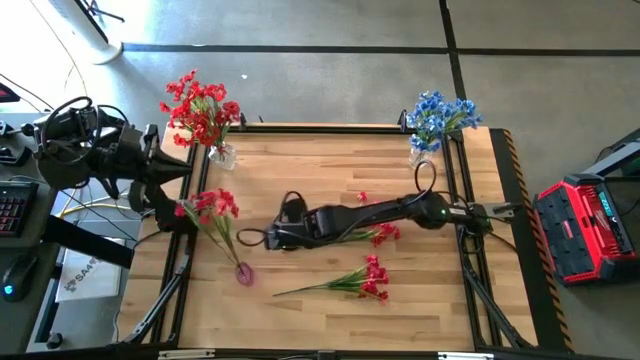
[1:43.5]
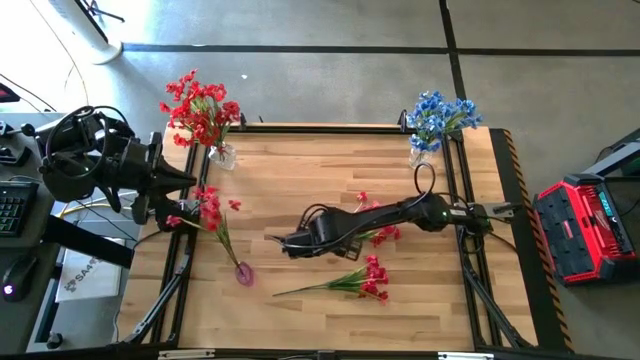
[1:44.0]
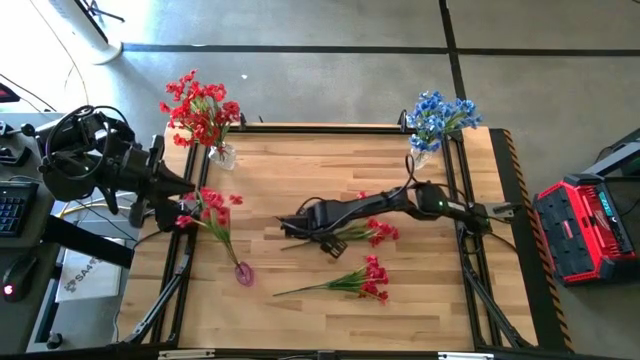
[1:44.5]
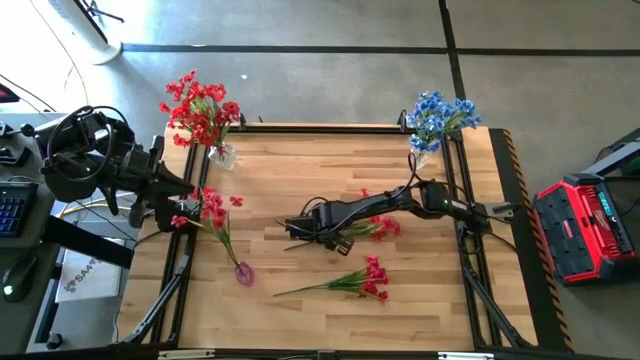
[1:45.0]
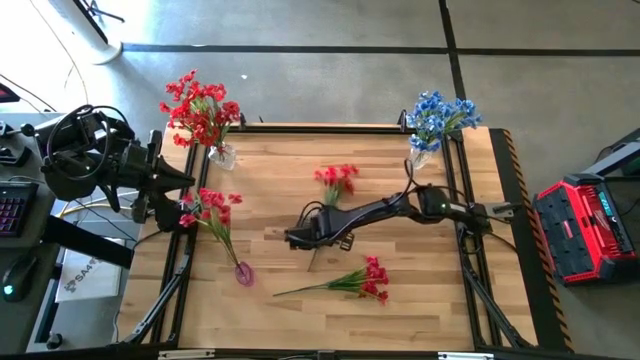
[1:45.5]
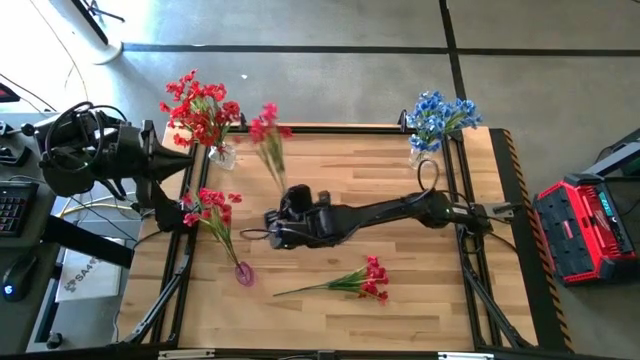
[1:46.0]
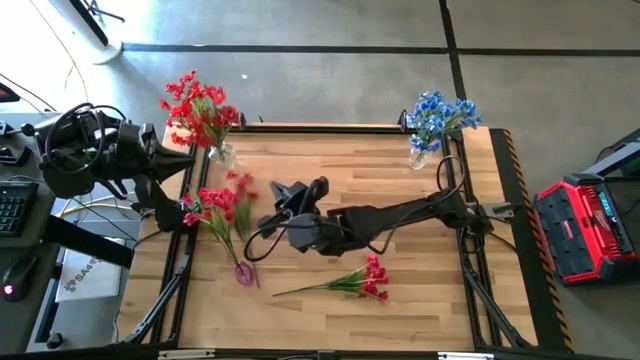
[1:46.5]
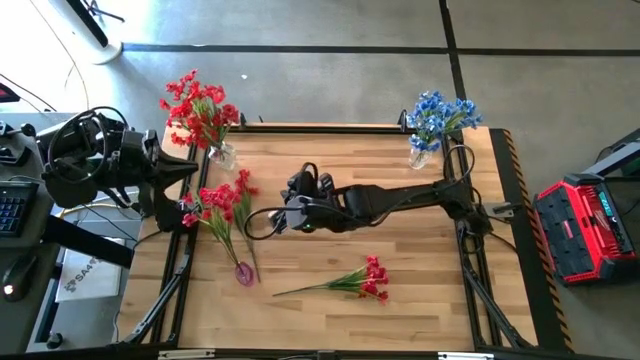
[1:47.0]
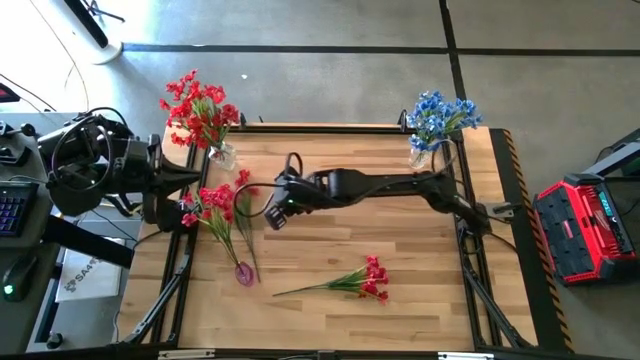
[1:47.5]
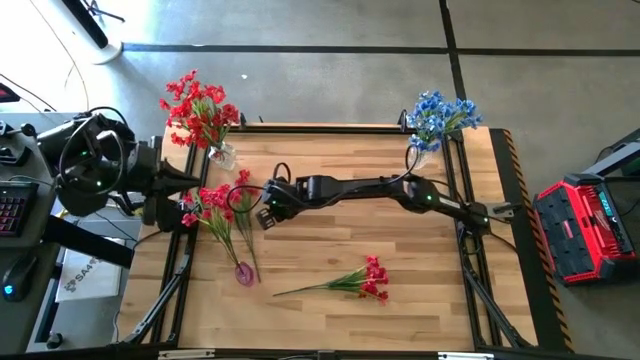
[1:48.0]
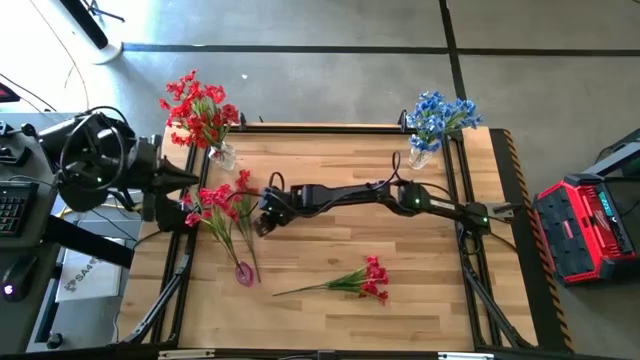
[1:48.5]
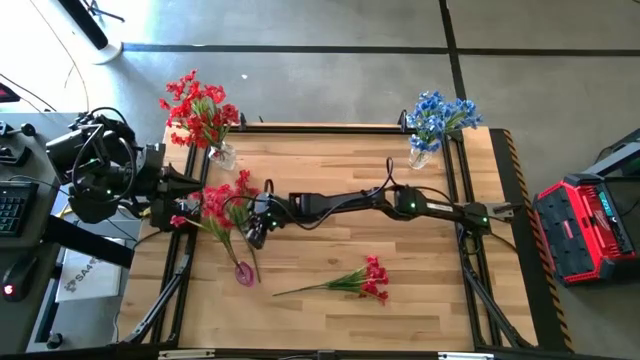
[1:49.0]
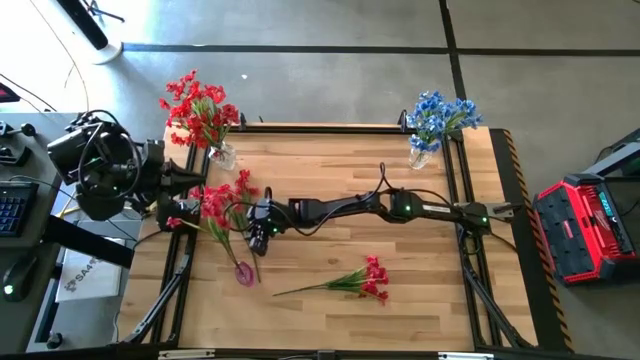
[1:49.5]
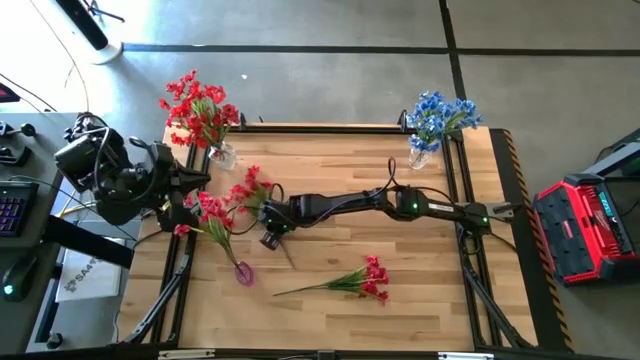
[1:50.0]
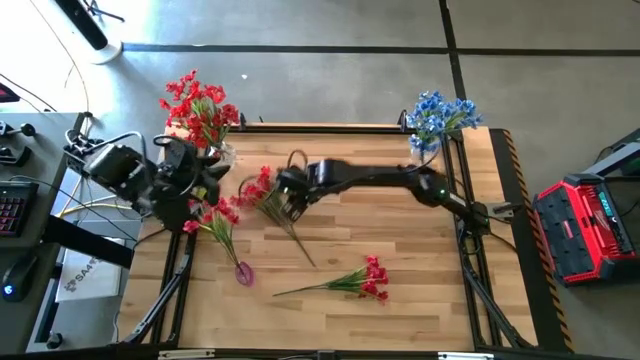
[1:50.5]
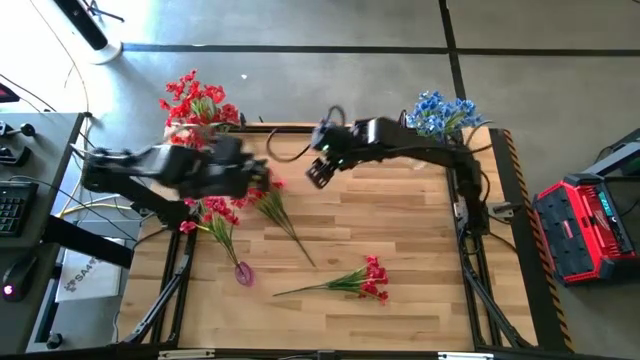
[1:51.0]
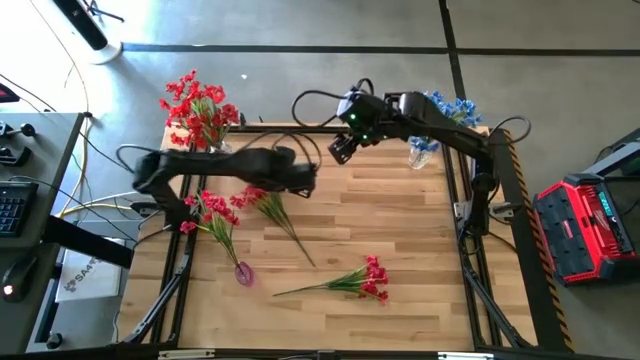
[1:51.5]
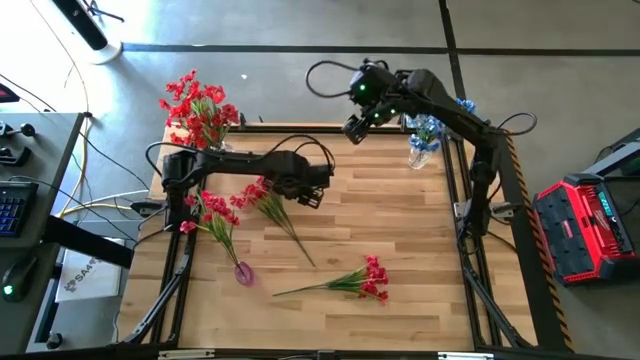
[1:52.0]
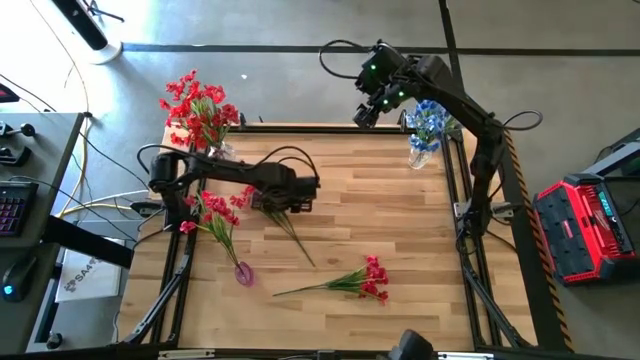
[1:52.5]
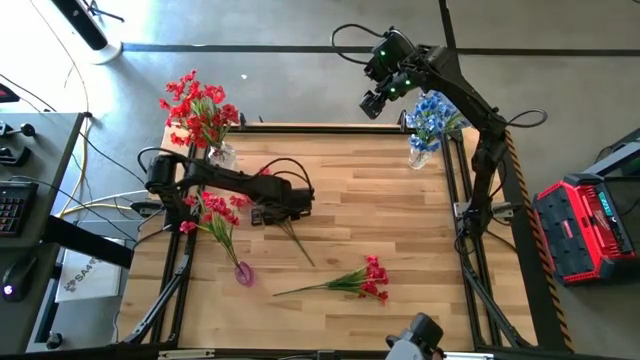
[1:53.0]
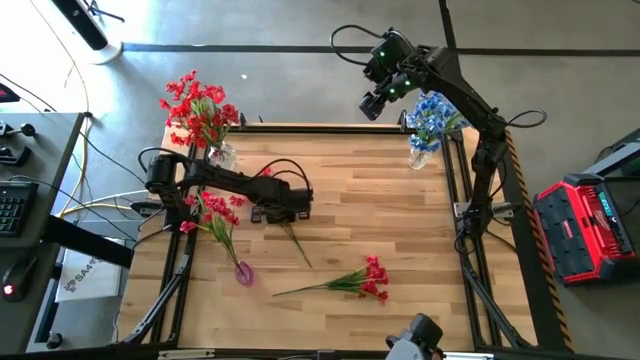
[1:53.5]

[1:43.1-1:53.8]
Task: Sort flowers into vase by color
Put the top red flower into the violet transparent vase

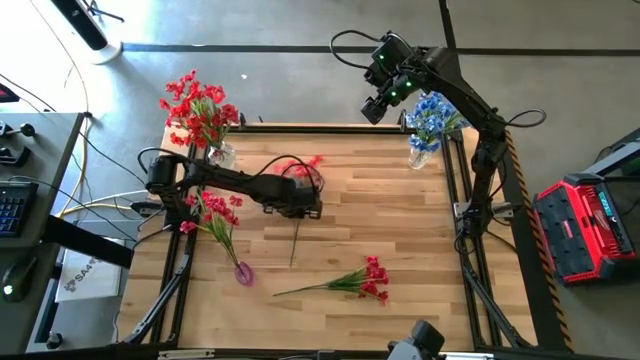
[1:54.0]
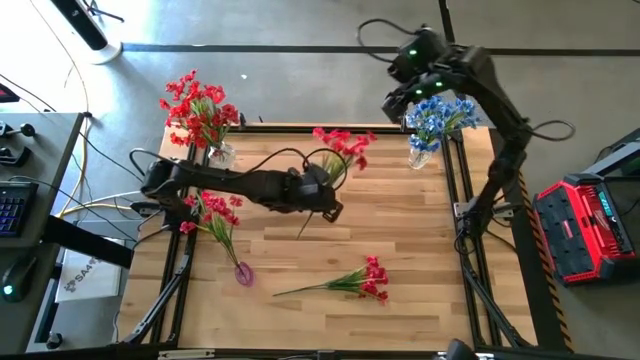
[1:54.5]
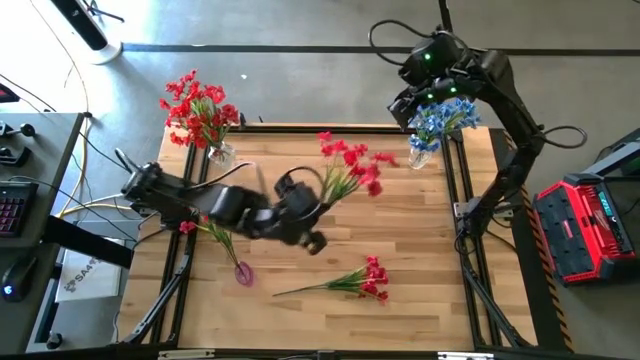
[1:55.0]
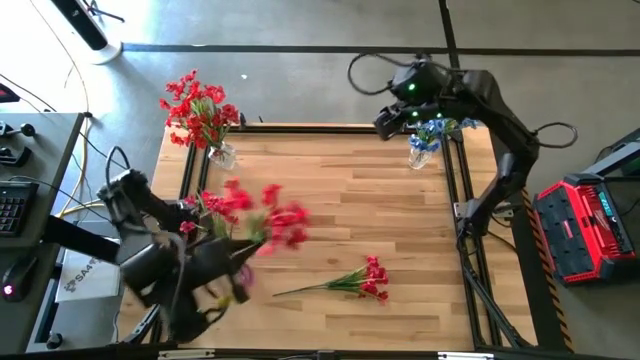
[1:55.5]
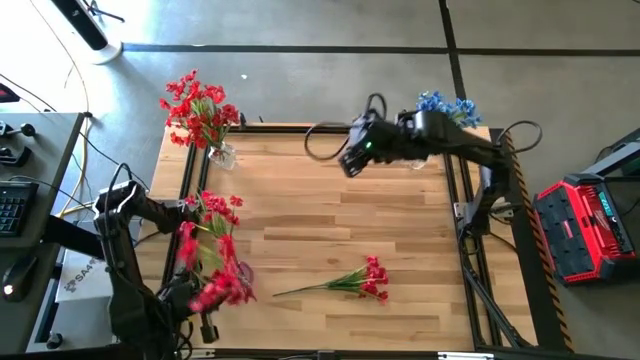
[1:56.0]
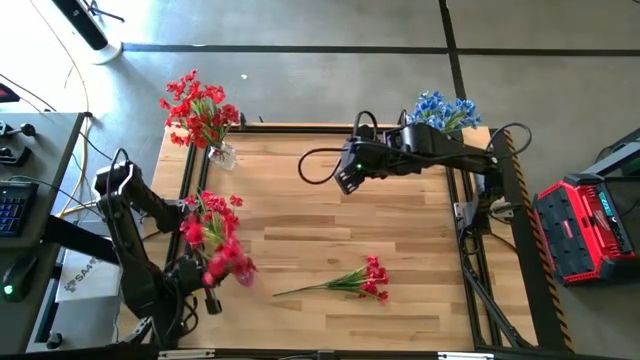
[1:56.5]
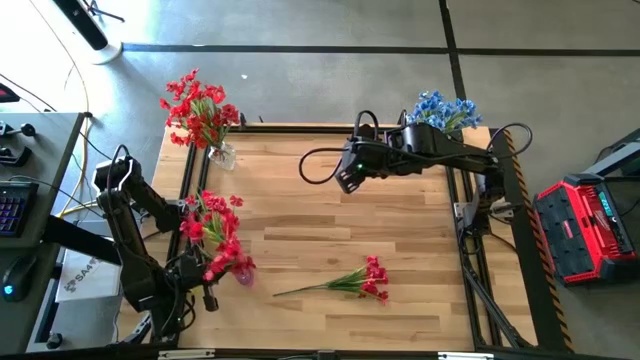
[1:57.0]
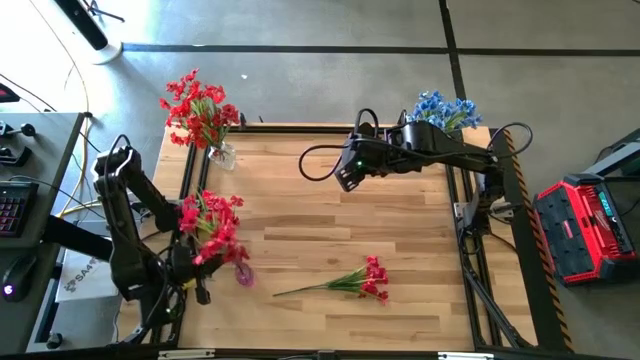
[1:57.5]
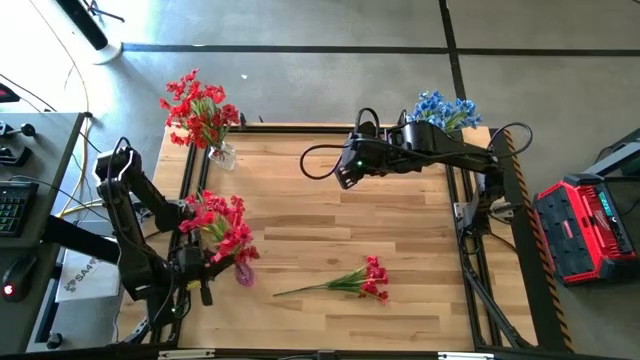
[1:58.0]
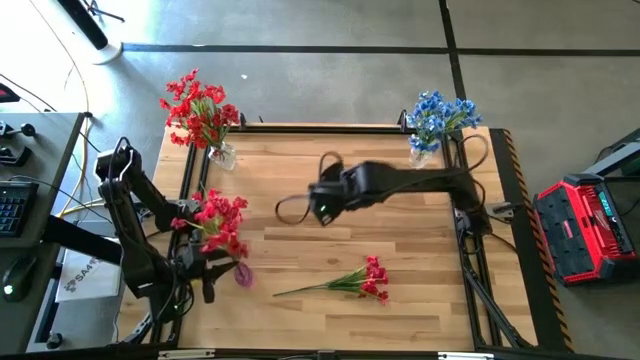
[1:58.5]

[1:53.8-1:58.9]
Put the top red flower into the violet transparent vase
